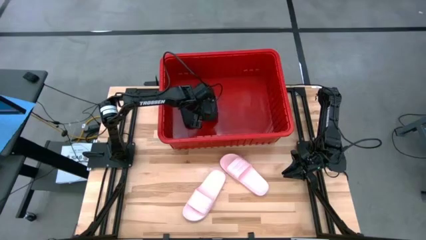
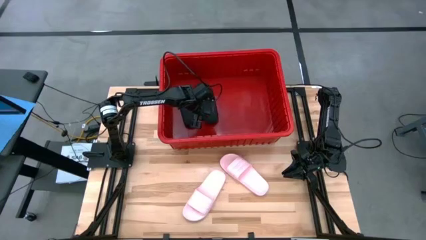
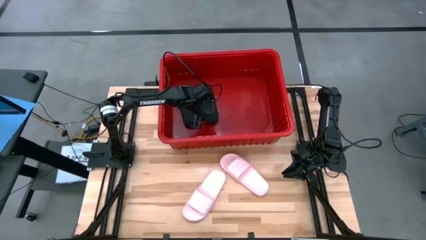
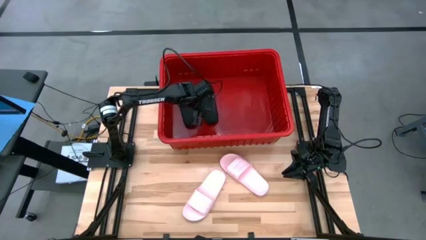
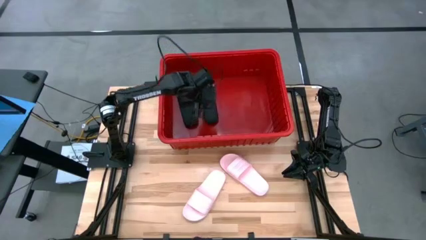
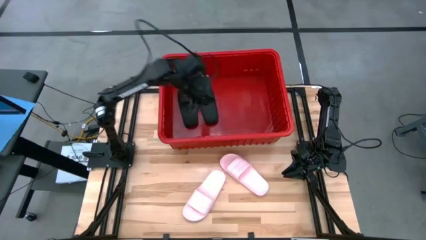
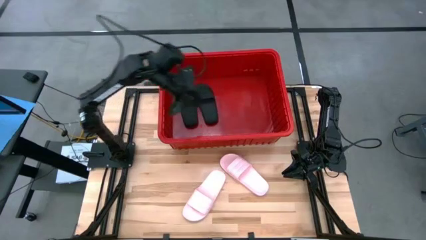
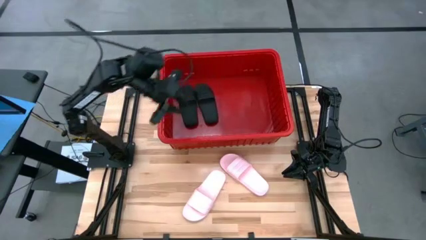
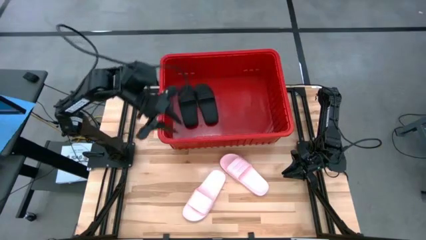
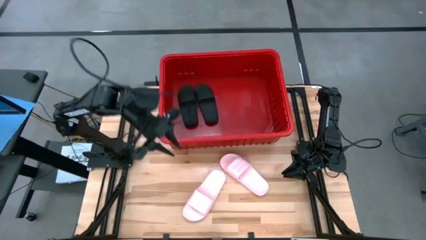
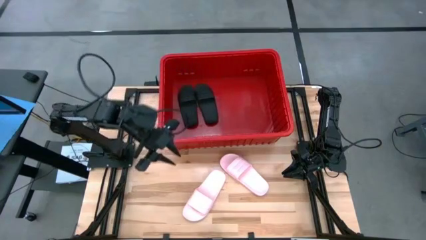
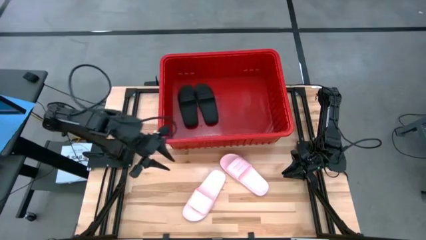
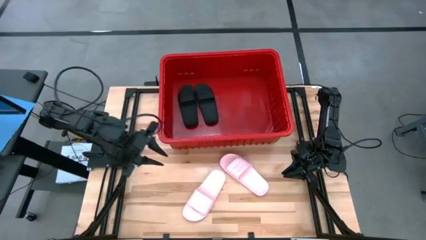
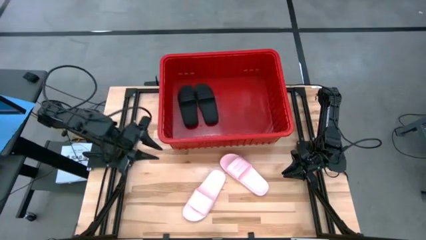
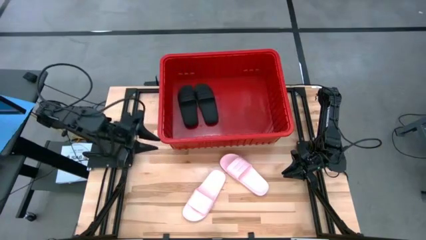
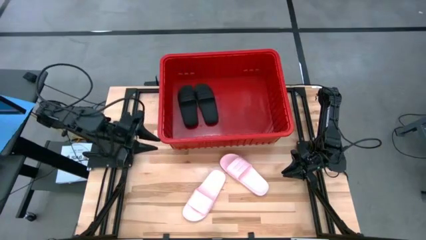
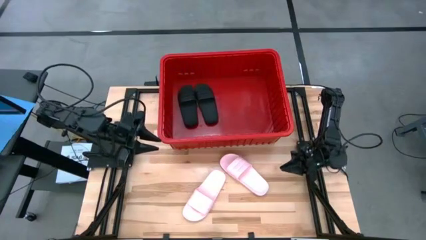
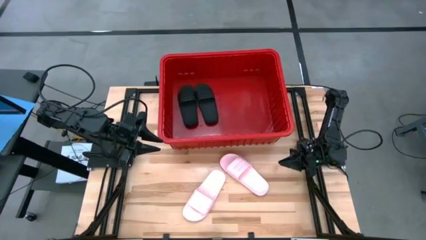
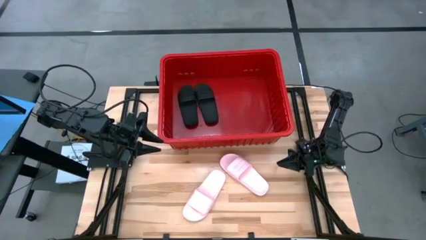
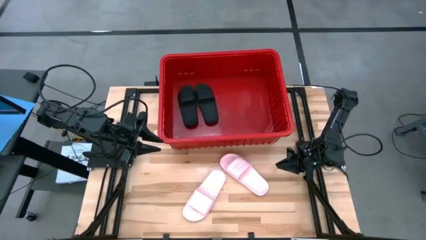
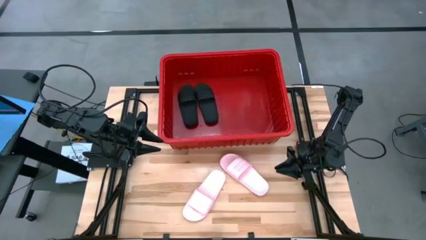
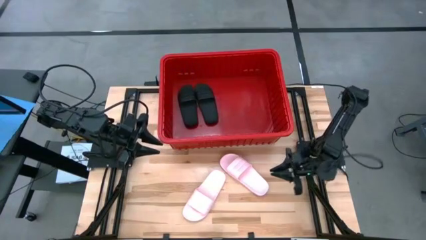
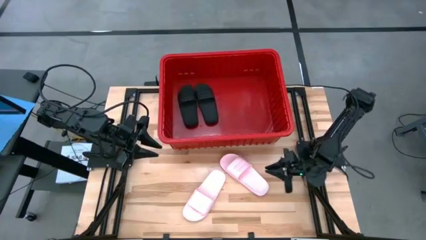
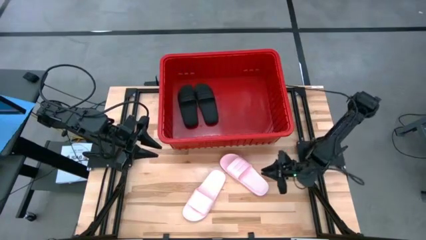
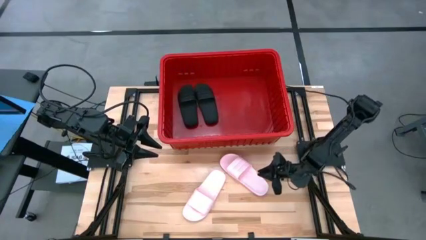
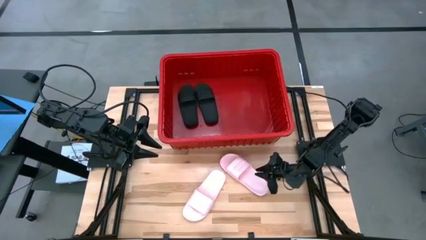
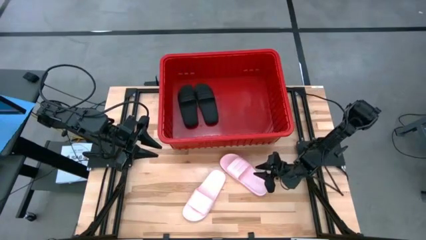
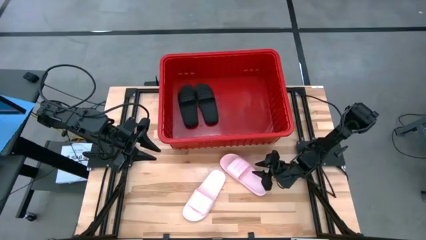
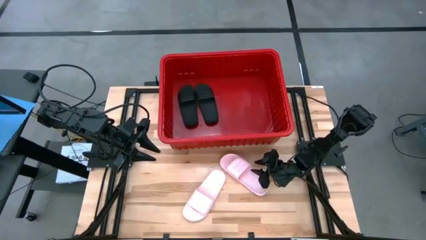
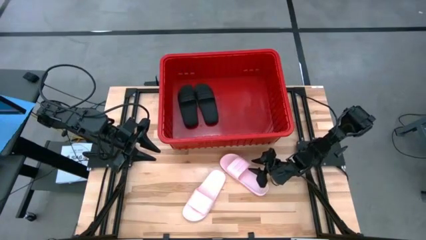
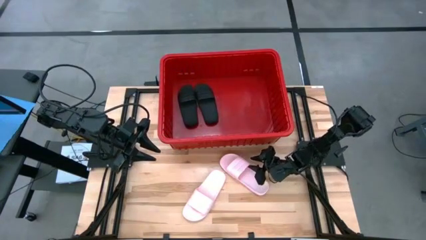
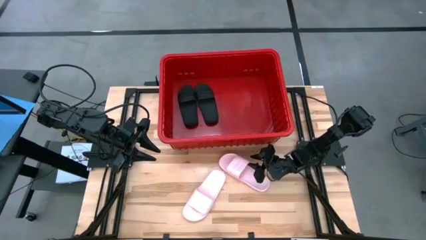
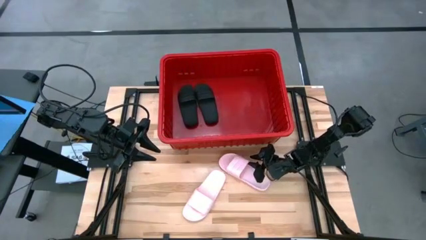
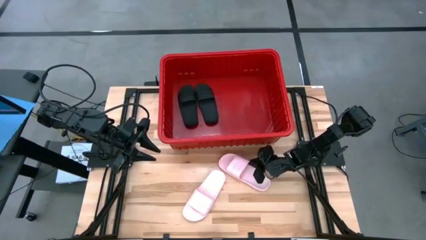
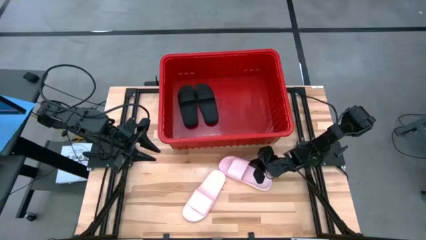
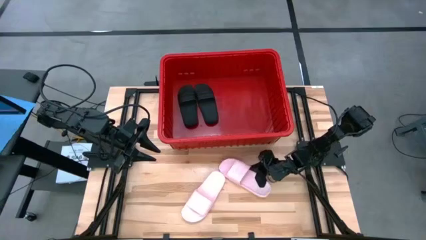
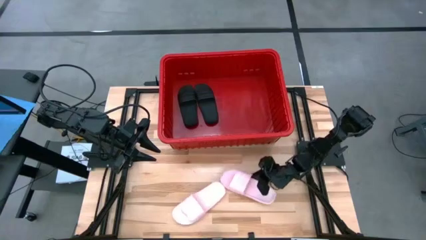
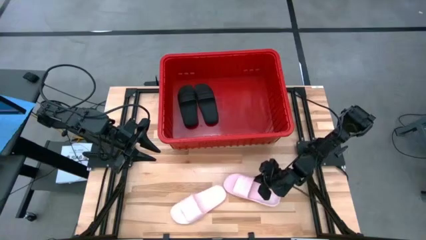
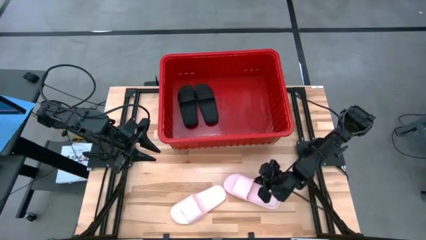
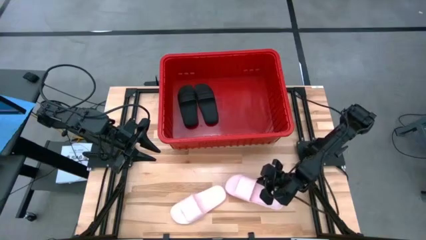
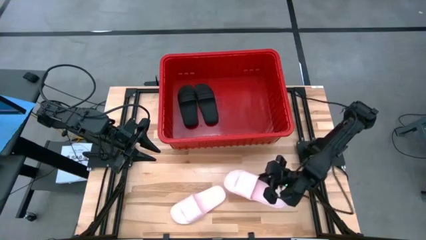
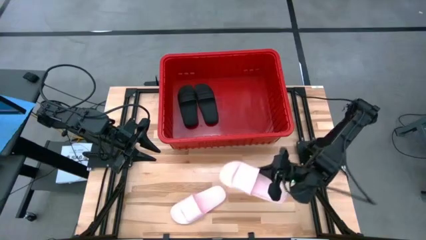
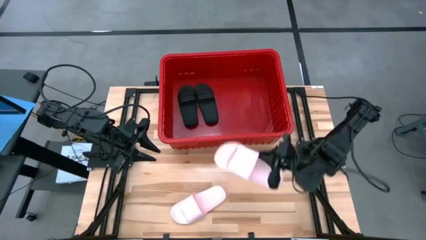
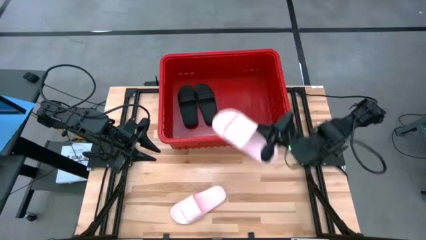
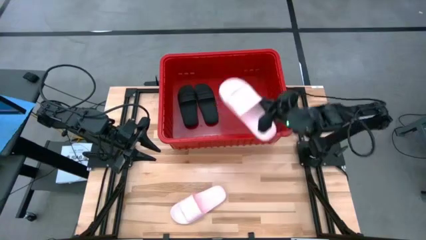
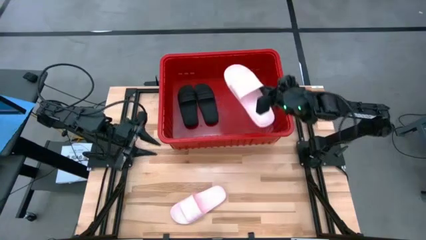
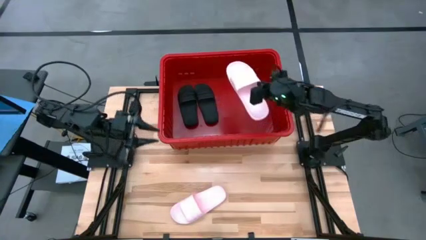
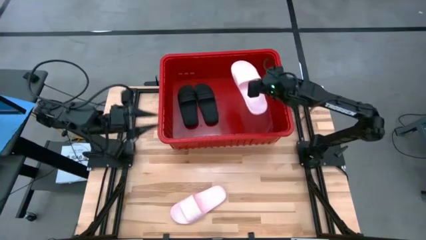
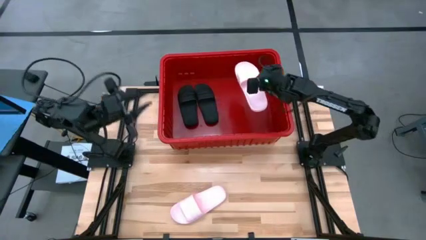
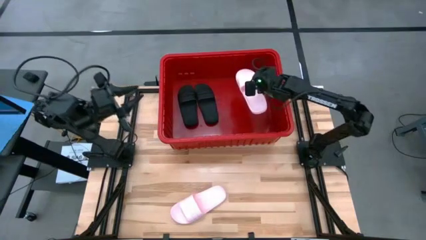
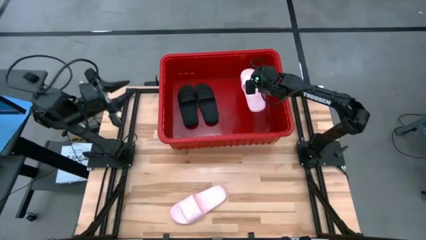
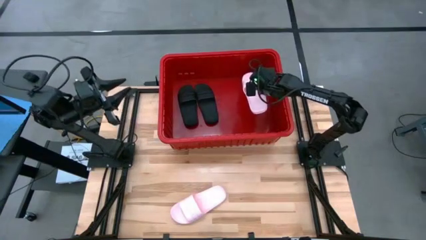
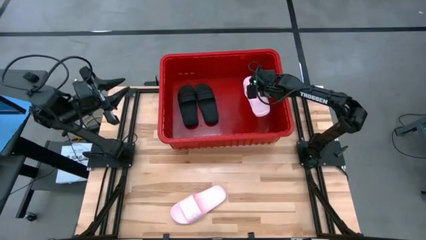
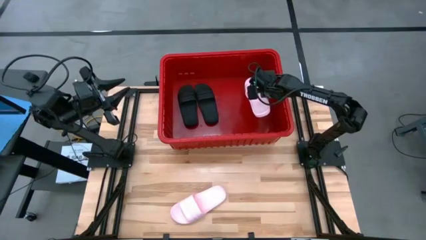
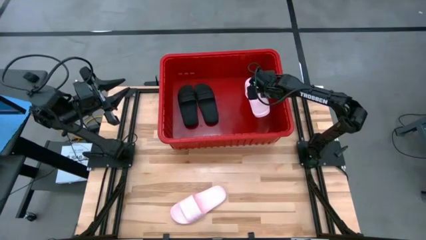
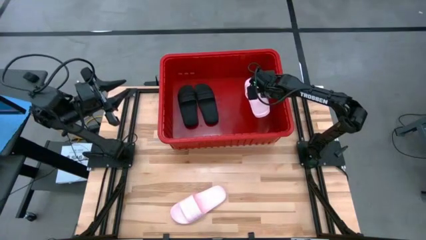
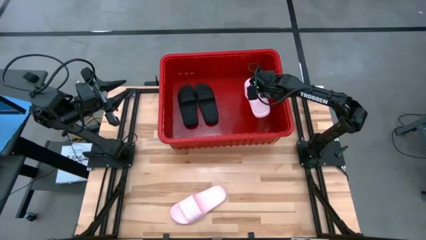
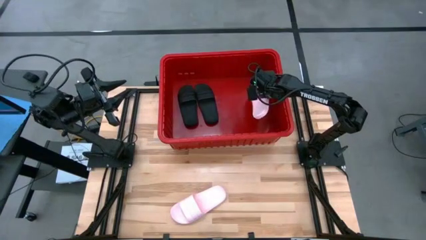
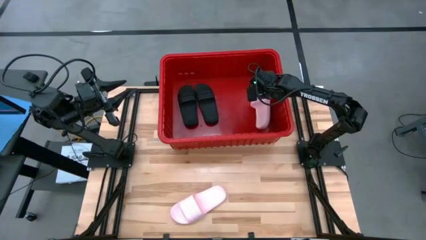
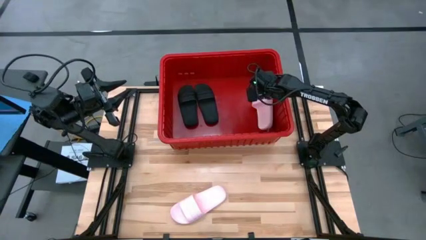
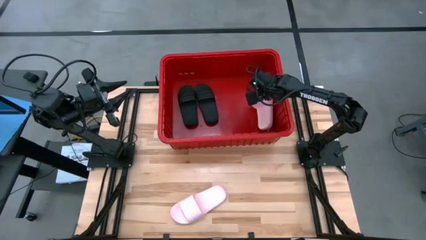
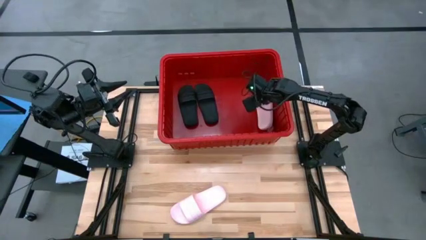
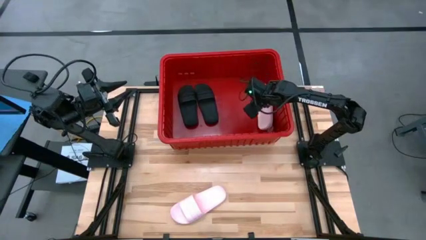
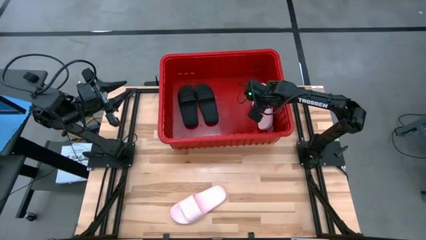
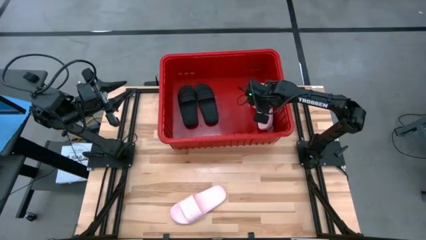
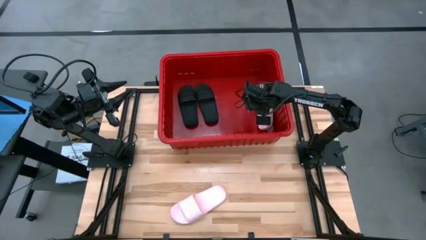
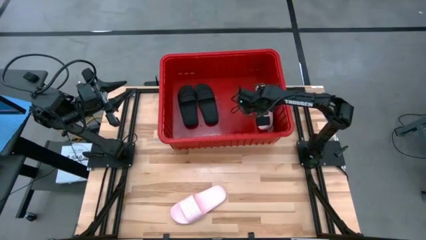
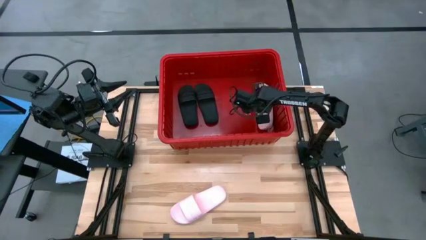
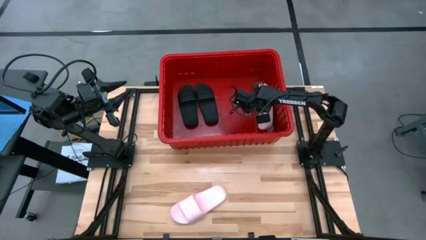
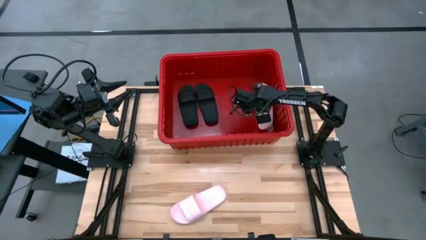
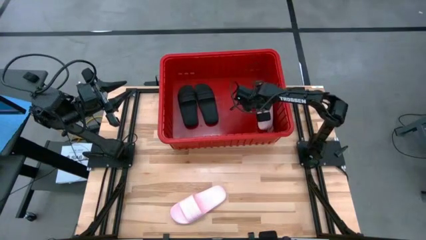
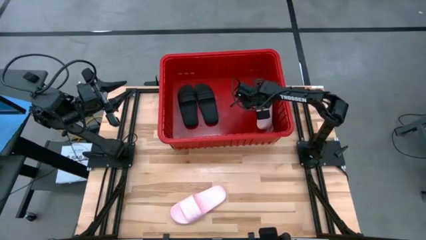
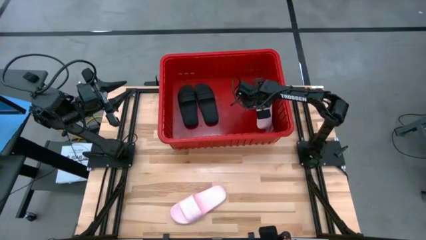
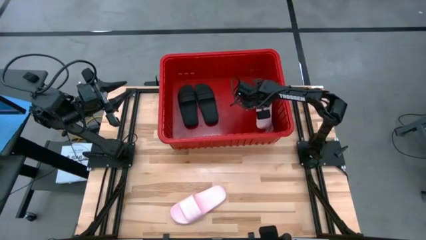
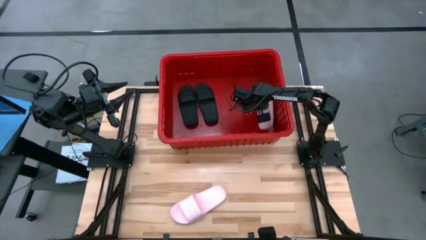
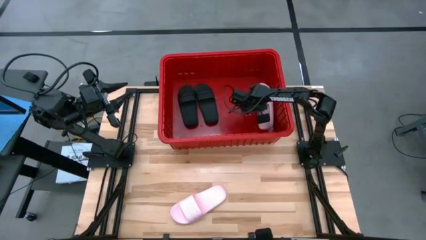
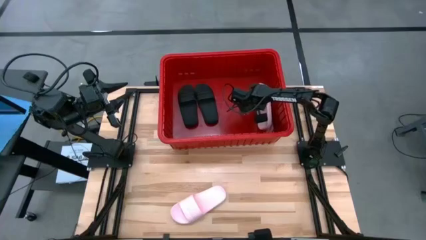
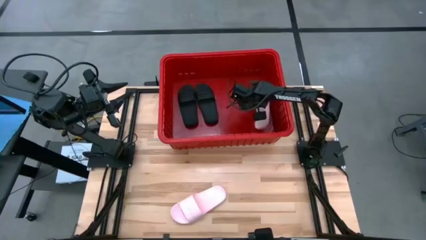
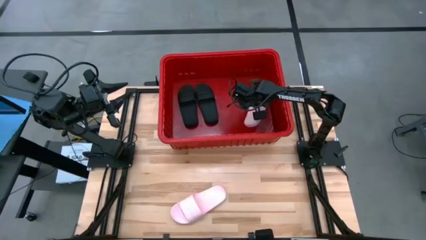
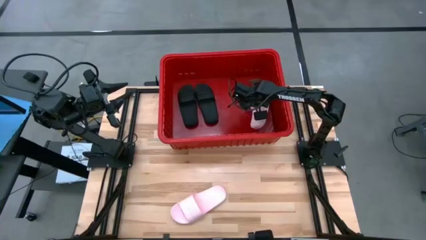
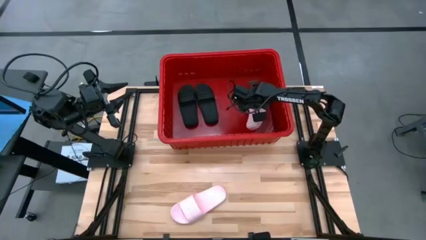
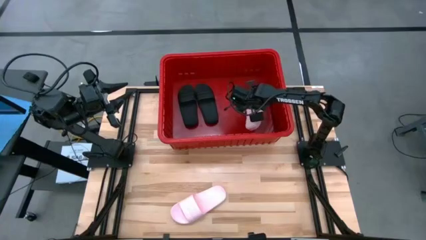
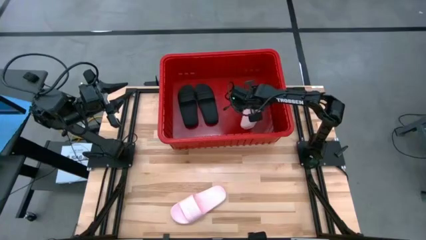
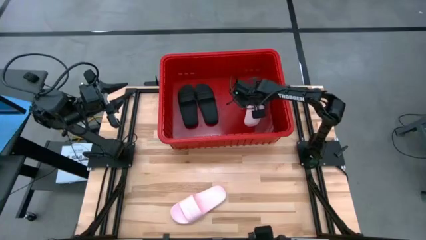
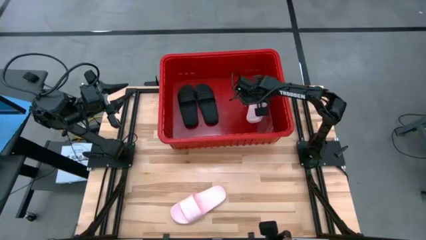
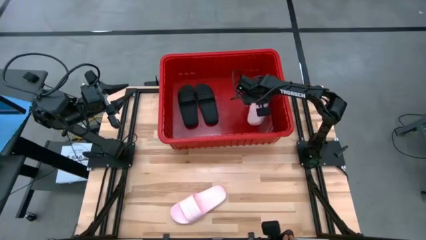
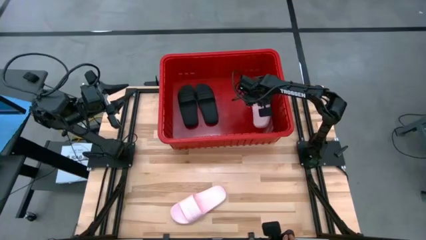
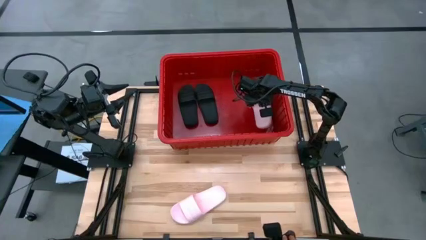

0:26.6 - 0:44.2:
Task: Pick and place slides into bin
Put the right pink slide into the basket
